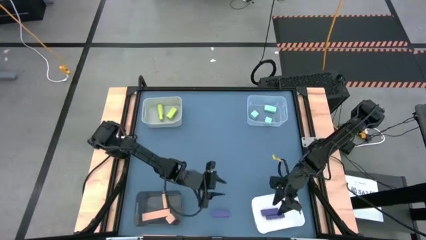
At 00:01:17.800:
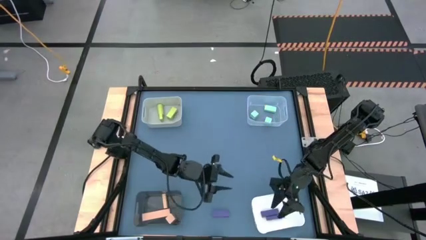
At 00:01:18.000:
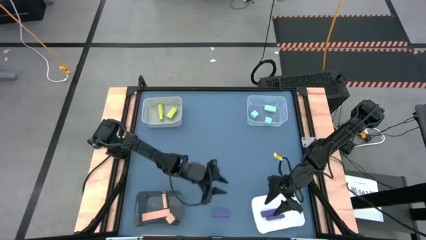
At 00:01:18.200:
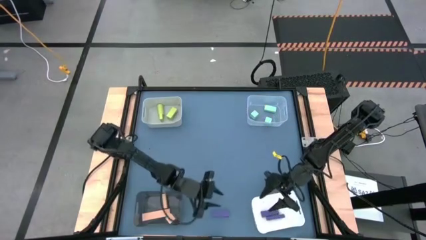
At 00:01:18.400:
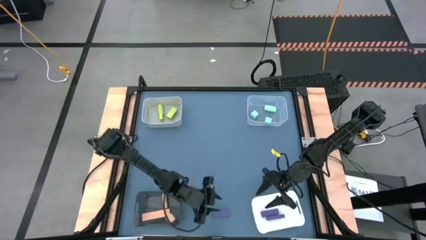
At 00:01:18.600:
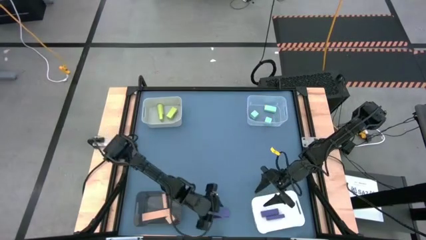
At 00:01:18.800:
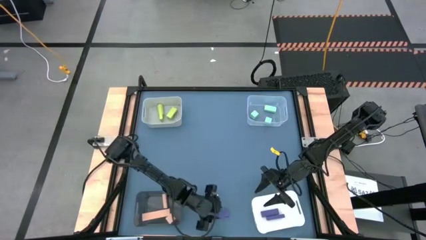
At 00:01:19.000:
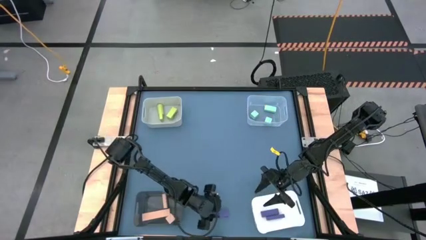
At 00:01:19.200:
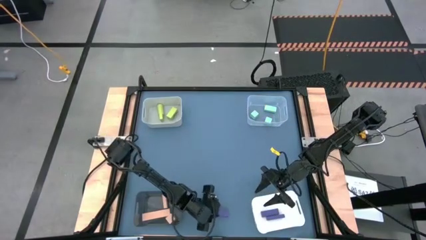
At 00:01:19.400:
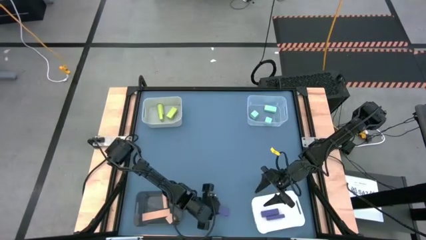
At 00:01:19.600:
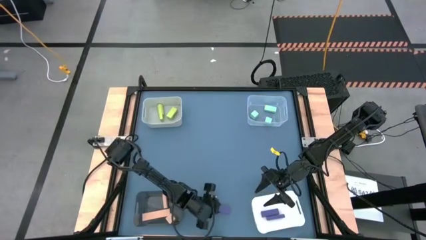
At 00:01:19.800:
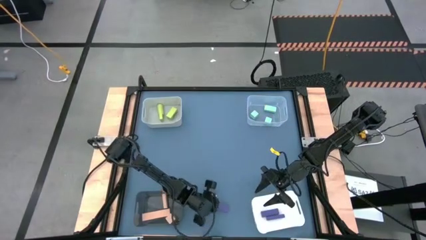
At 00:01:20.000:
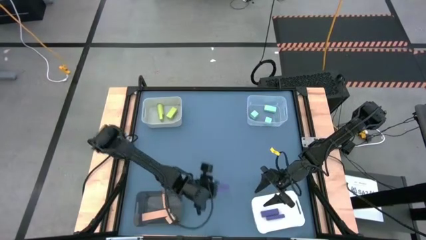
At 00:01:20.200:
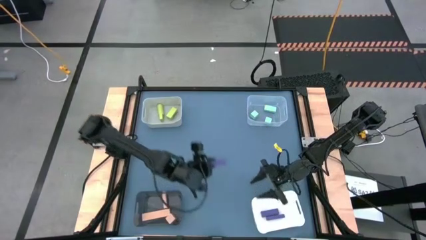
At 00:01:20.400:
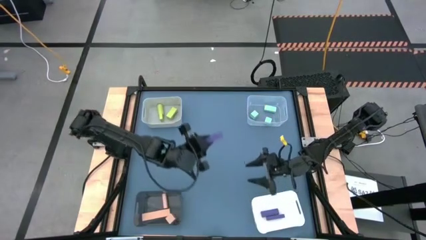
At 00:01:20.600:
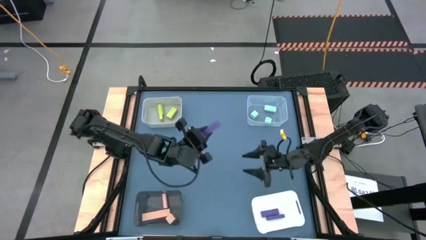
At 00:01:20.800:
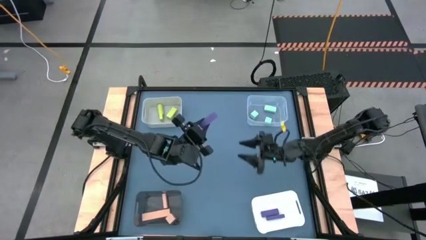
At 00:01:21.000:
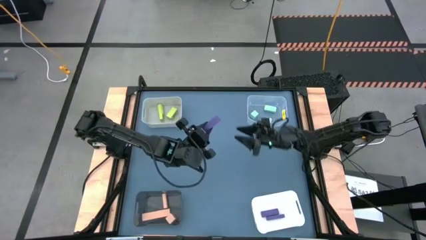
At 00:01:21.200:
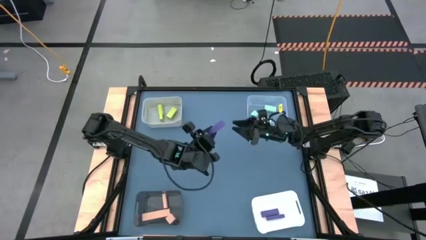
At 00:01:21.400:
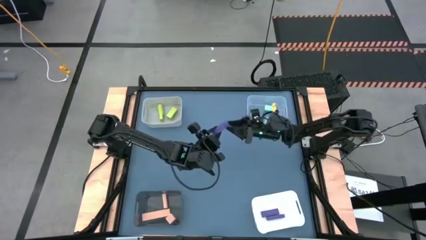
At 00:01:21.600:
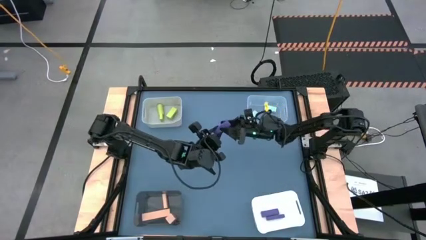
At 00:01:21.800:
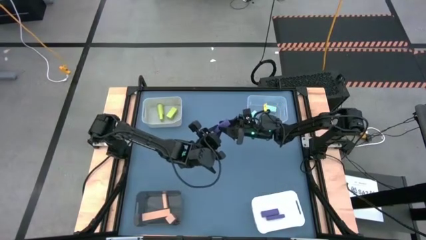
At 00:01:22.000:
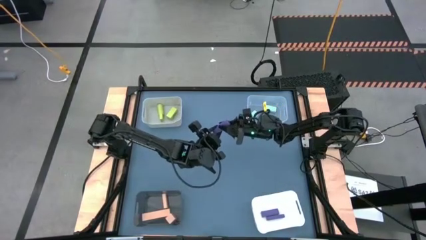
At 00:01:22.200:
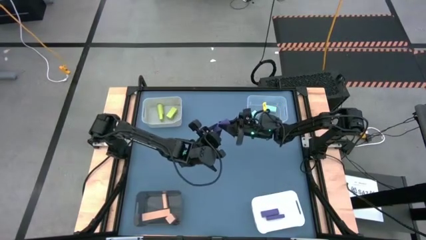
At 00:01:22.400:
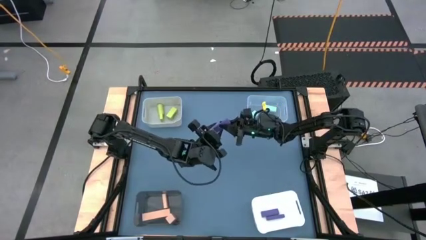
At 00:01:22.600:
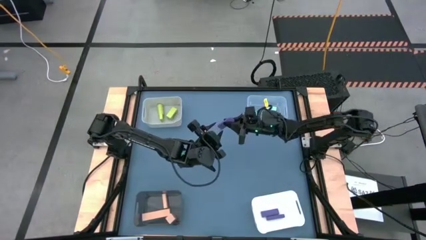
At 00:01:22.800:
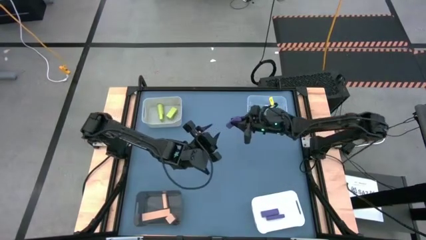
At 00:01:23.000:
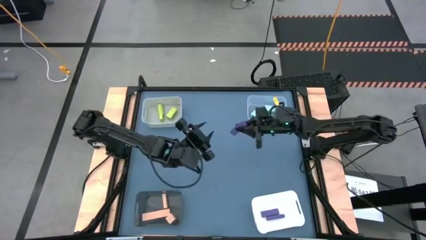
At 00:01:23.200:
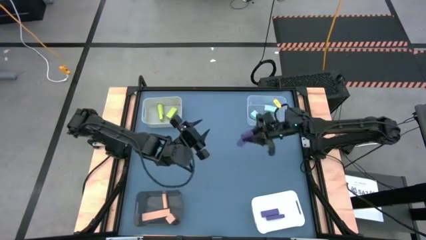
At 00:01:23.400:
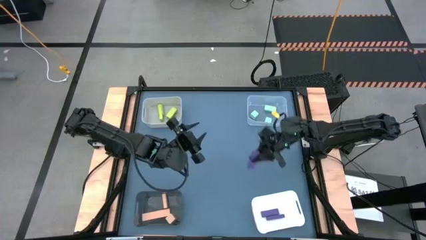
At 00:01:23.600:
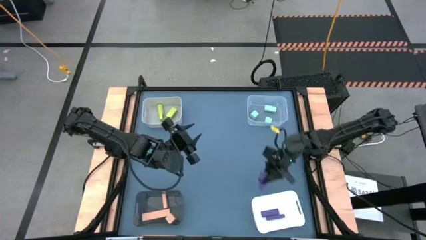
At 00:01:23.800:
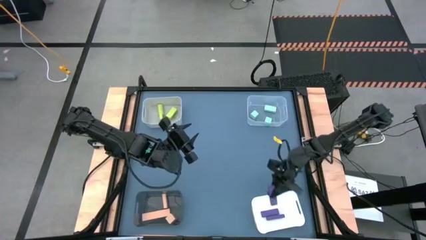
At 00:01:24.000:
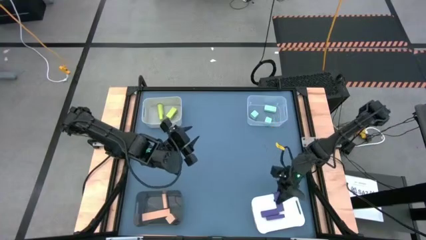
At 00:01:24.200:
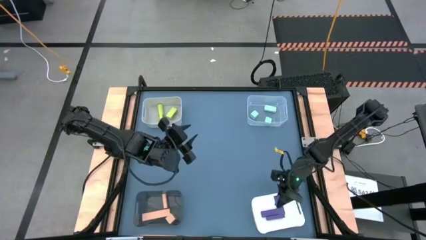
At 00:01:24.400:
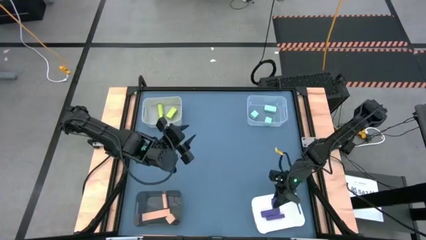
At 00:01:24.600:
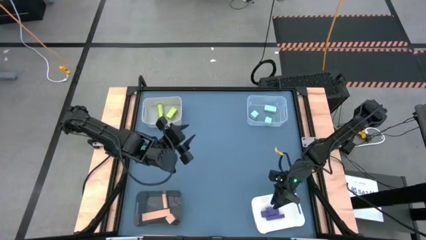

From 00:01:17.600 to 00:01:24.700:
Task: Sort & place blocks by color
Put the purple block into the white bin

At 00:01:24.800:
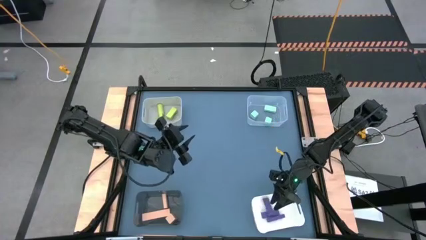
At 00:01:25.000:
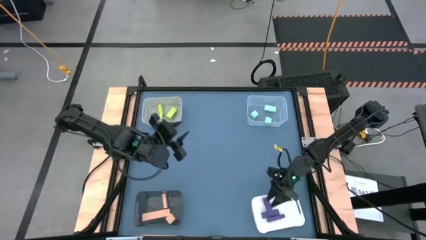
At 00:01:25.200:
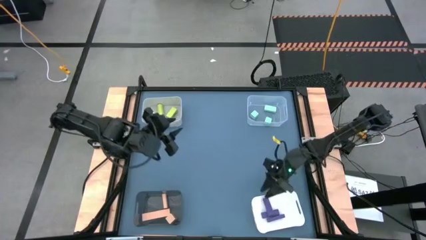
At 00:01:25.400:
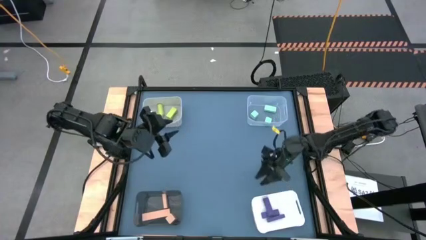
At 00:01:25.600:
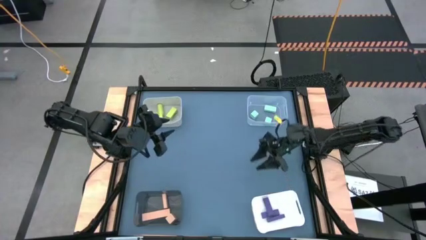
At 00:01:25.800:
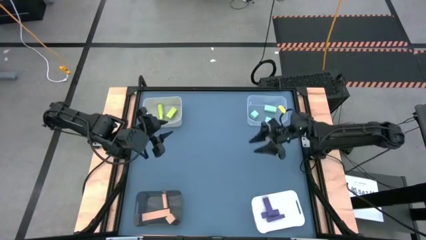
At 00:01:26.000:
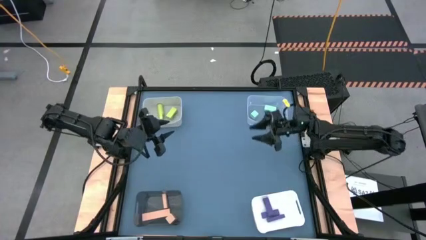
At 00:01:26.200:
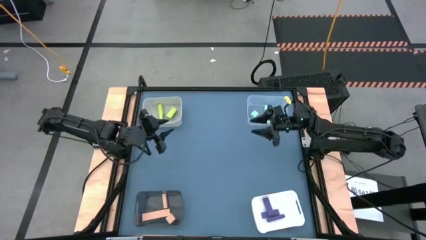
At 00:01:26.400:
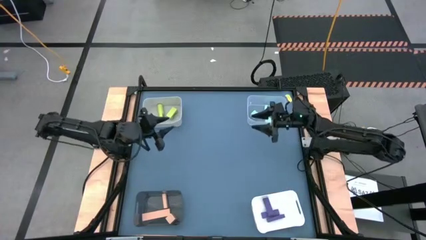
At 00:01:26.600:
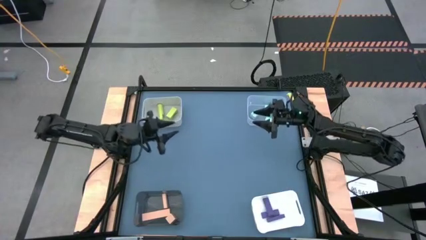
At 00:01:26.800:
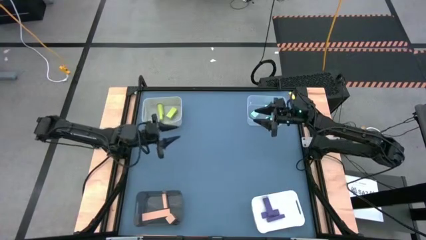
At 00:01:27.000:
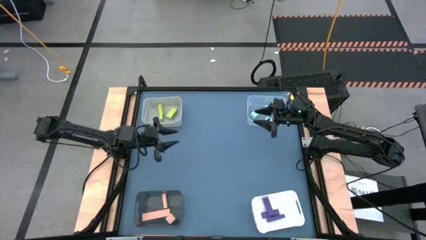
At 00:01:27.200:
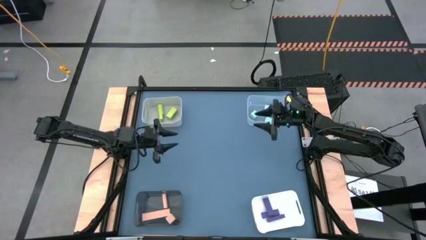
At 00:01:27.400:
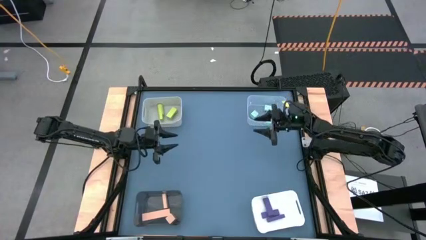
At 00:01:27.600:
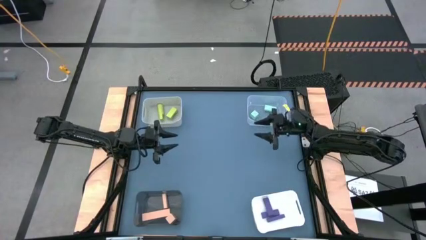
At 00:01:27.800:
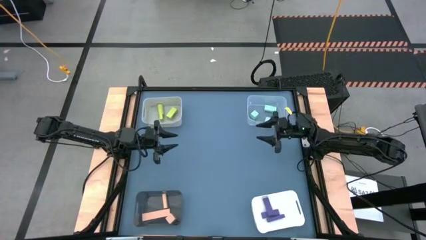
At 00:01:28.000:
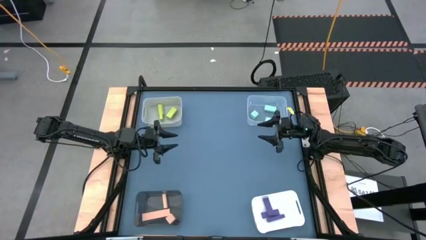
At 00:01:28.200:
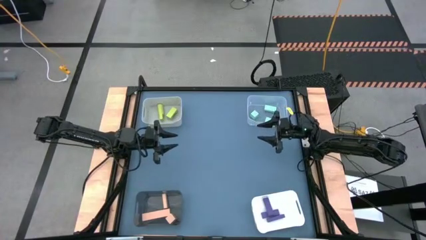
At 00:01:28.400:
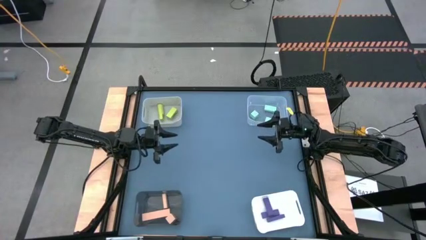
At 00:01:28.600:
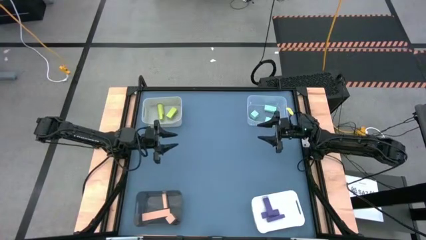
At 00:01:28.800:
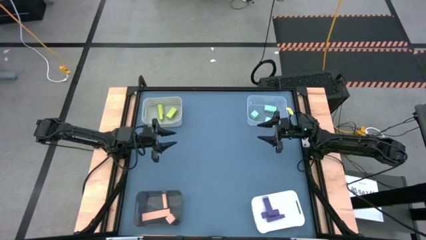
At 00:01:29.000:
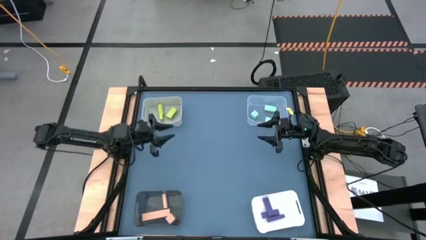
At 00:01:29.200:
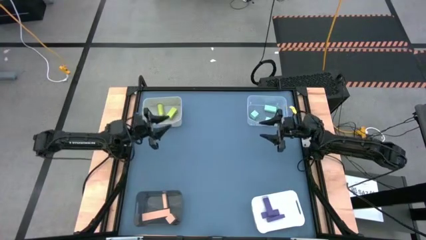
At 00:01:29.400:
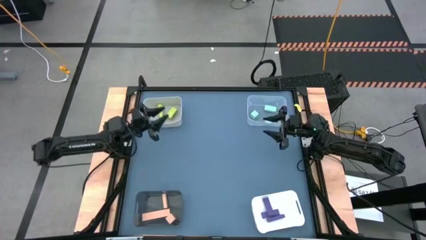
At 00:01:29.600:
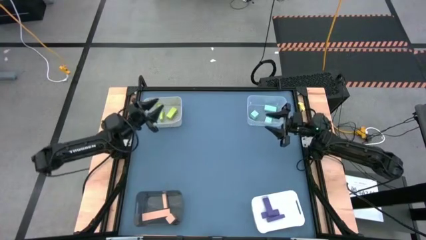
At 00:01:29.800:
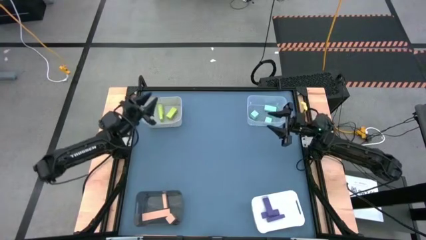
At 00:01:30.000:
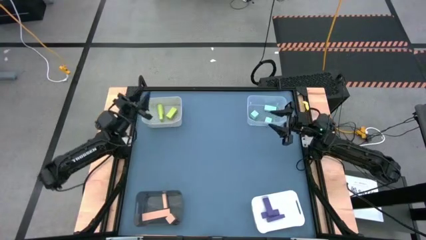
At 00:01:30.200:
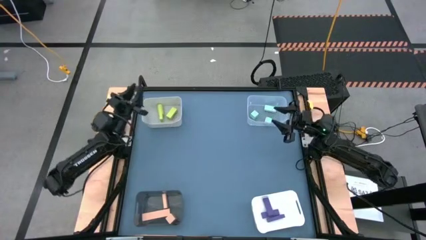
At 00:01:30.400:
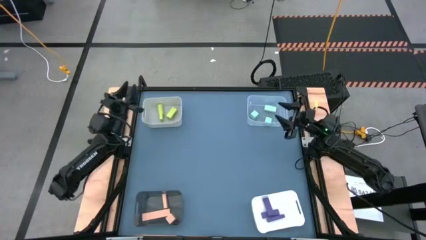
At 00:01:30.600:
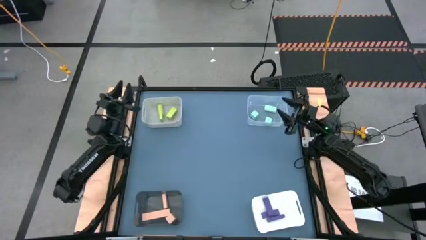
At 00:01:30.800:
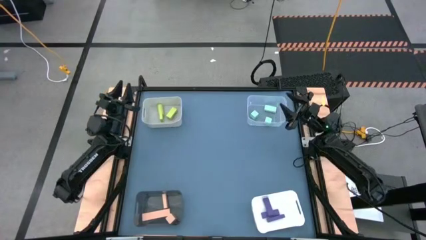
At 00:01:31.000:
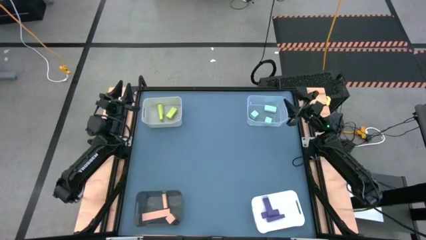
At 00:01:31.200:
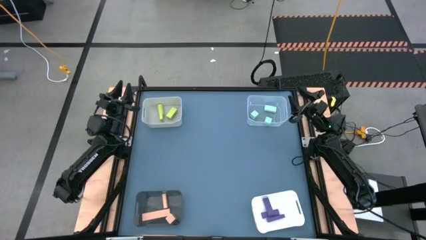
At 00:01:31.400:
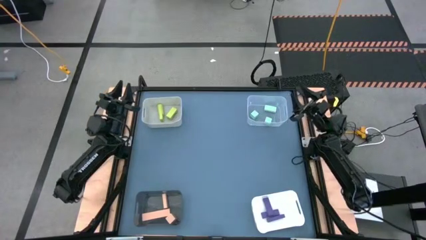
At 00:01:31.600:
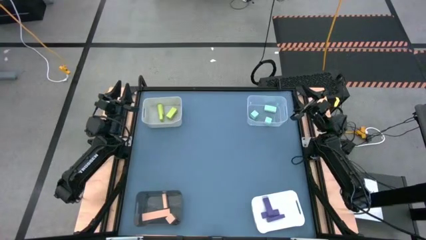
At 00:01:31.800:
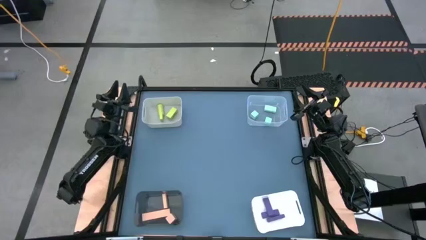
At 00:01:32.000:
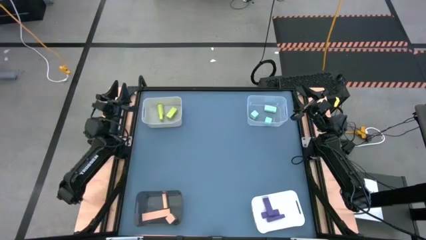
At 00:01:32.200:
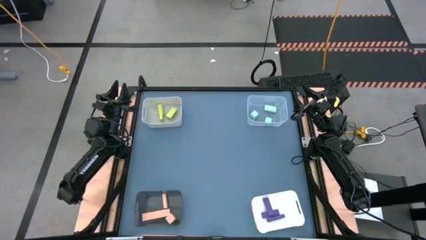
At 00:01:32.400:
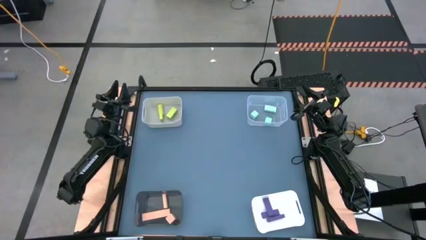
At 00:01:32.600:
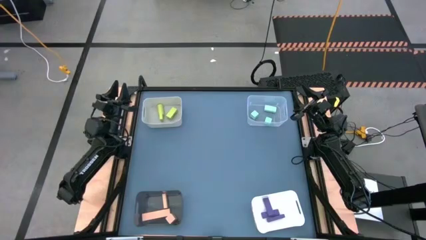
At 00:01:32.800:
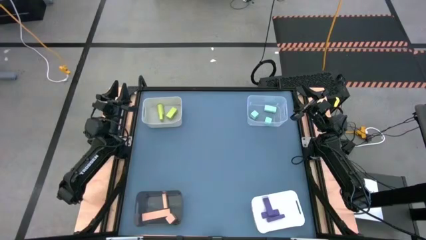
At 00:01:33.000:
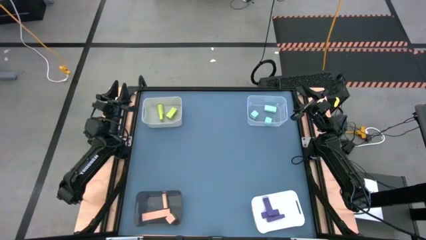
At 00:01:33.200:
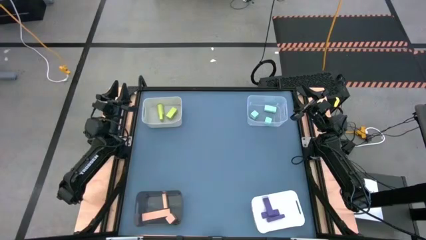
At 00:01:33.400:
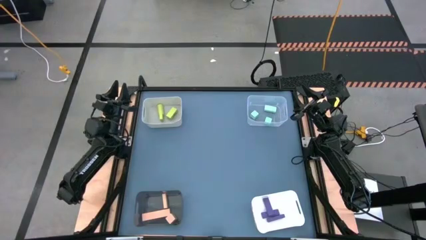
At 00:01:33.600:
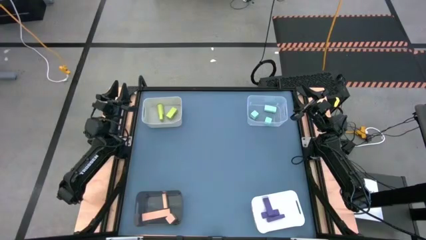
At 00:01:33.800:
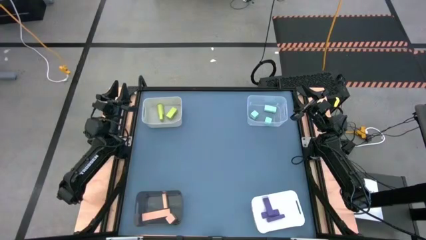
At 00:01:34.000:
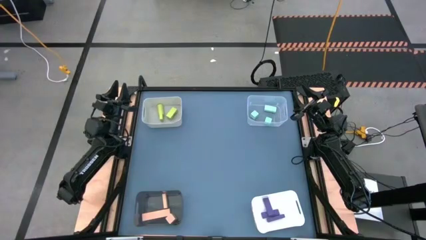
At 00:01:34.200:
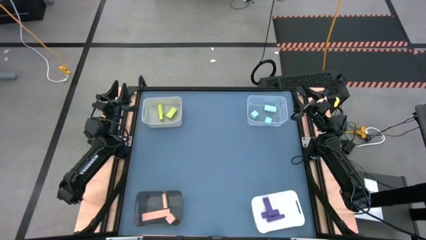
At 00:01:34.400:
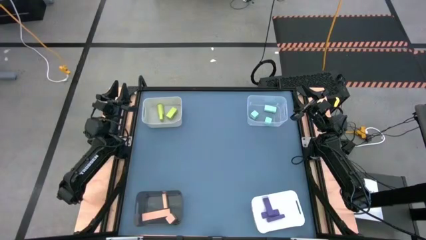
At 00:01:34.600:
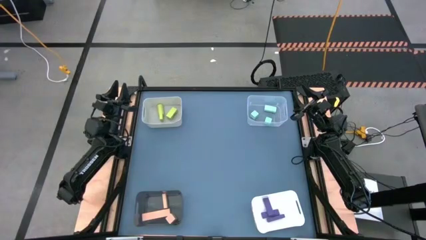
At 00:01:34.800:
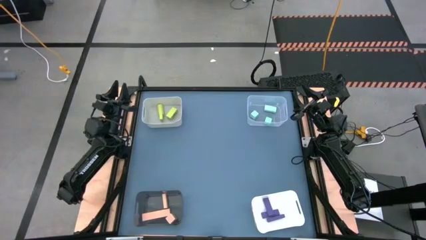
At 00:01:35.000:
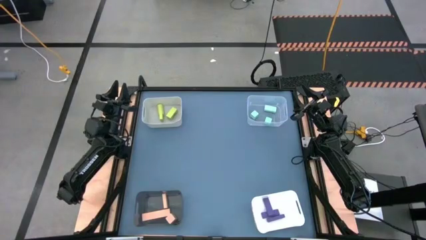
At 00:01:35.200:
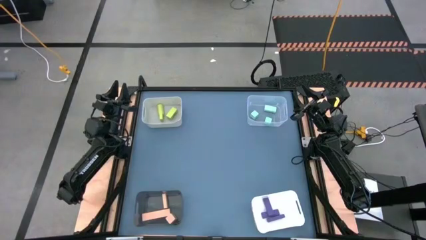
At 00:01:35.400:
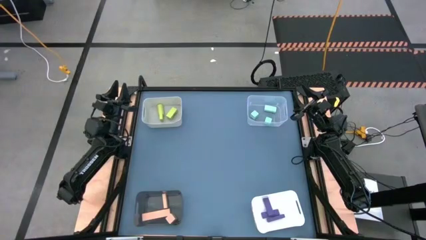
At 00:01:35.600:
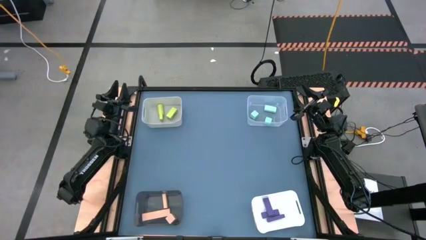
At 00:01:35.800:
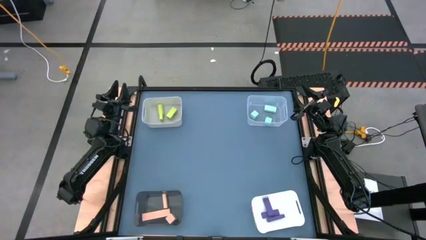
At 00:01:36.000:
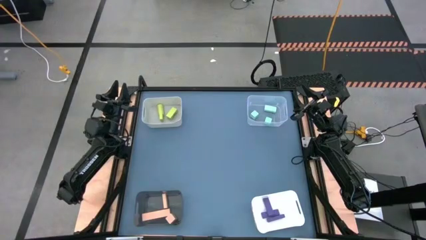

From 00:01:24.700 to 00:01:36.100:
Return to Home Position
